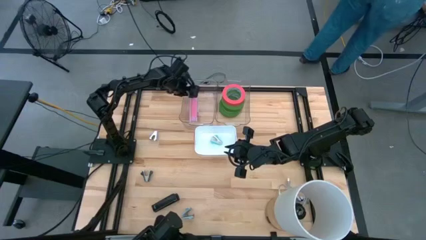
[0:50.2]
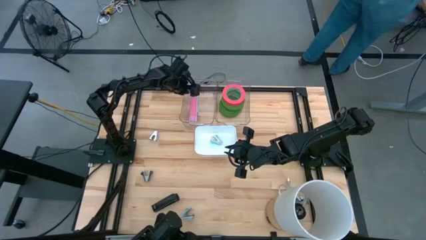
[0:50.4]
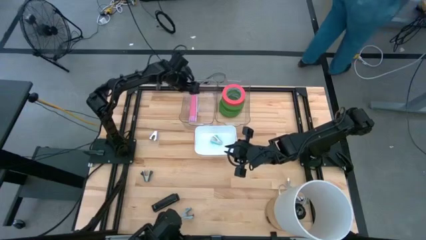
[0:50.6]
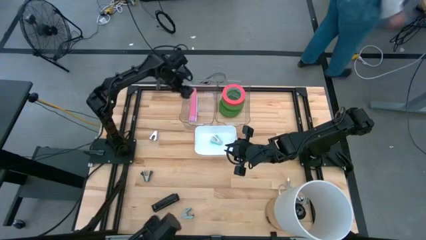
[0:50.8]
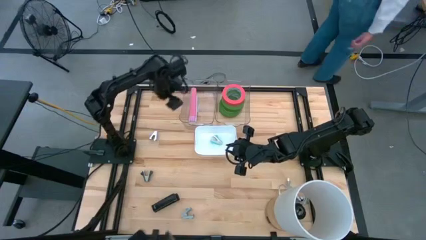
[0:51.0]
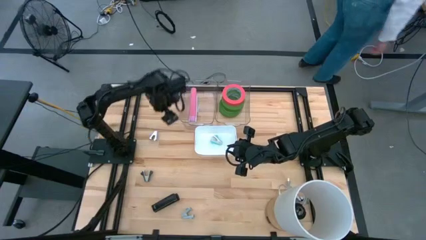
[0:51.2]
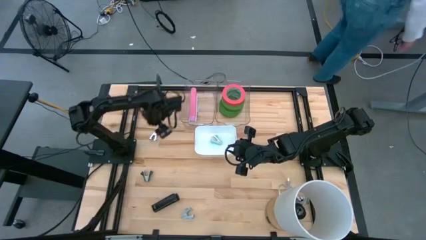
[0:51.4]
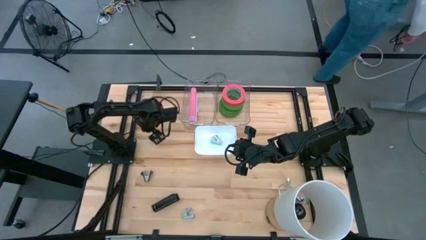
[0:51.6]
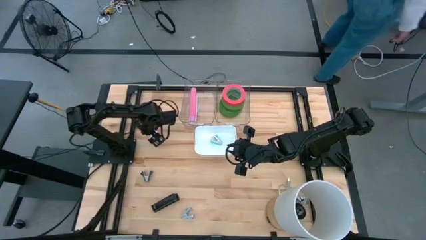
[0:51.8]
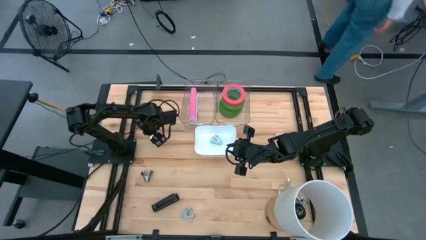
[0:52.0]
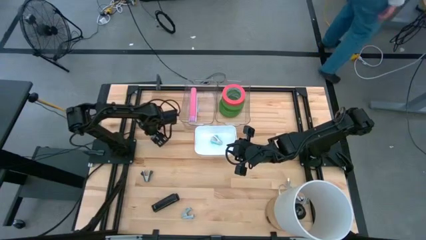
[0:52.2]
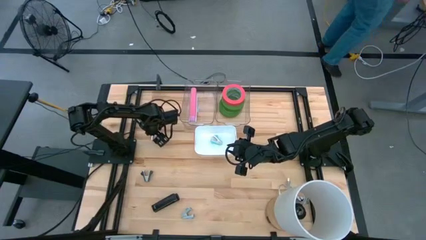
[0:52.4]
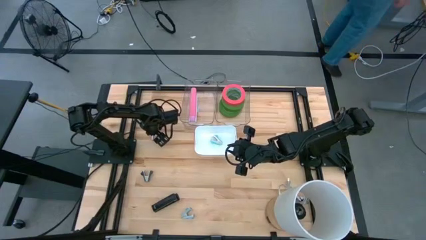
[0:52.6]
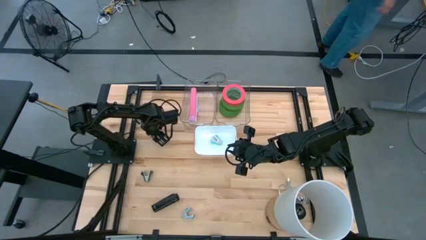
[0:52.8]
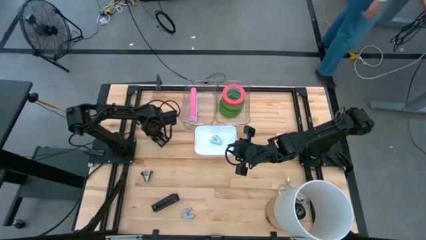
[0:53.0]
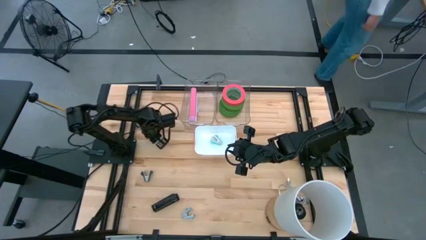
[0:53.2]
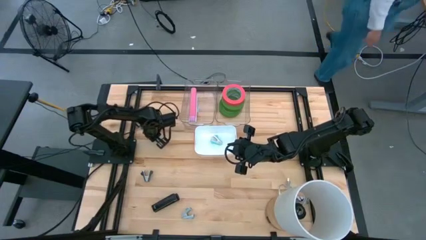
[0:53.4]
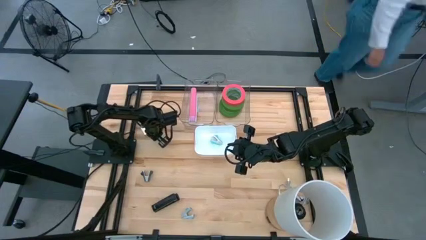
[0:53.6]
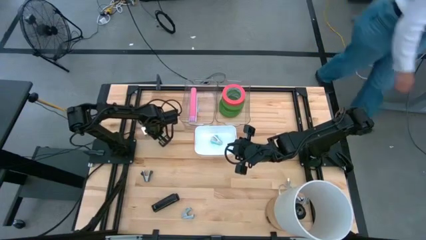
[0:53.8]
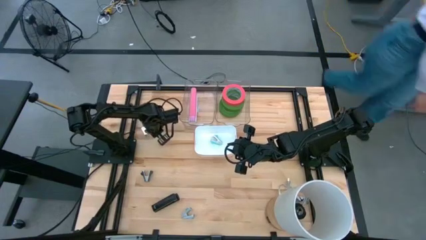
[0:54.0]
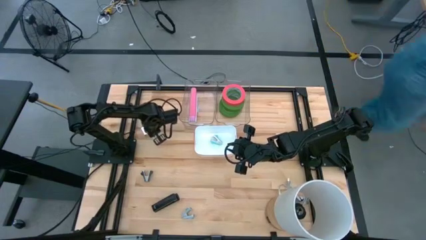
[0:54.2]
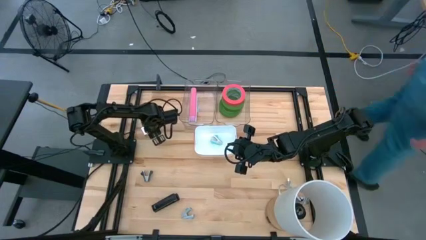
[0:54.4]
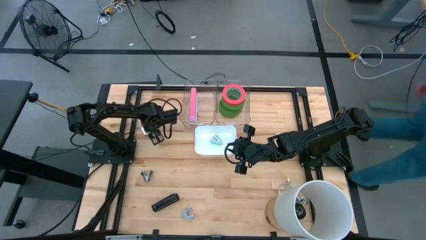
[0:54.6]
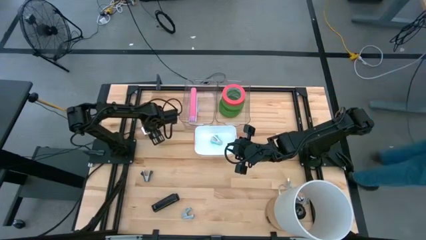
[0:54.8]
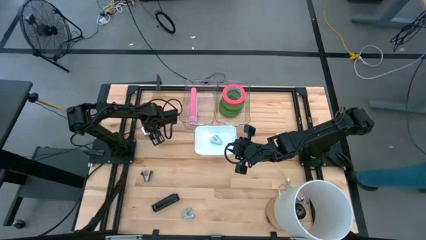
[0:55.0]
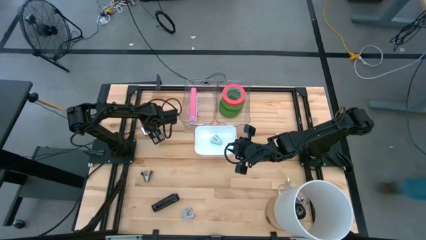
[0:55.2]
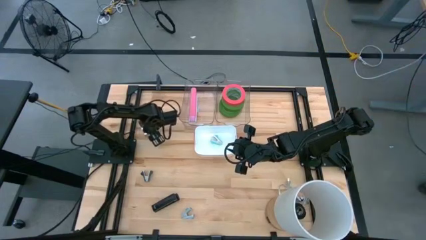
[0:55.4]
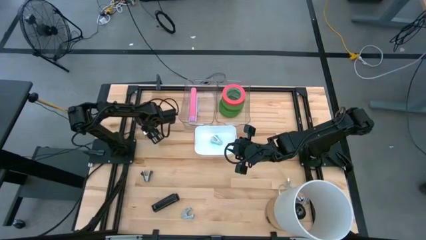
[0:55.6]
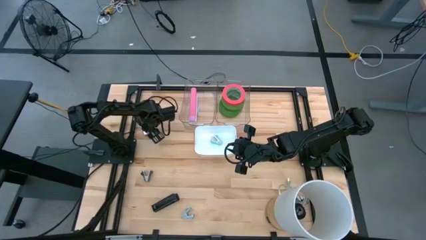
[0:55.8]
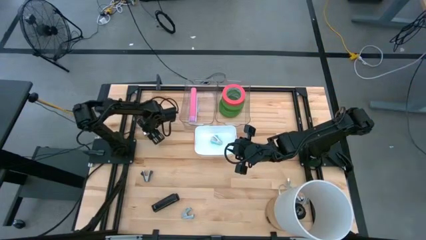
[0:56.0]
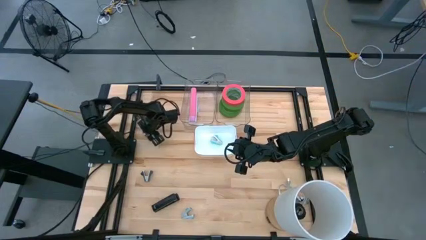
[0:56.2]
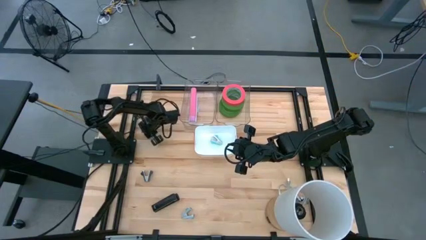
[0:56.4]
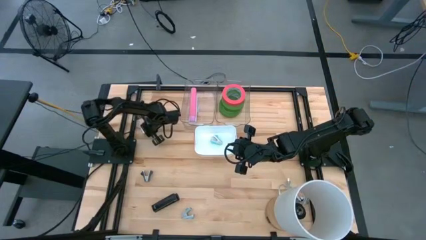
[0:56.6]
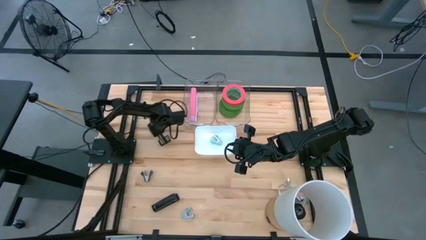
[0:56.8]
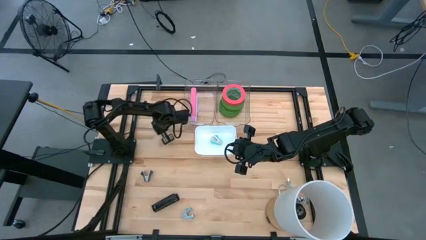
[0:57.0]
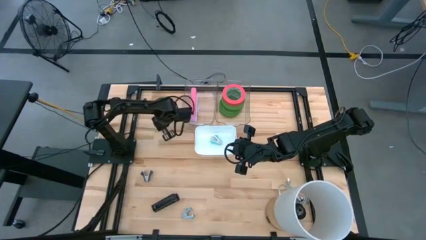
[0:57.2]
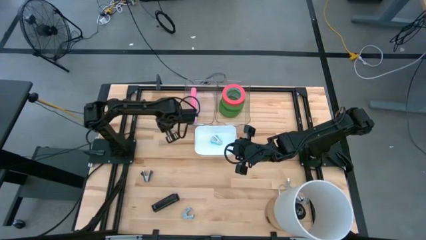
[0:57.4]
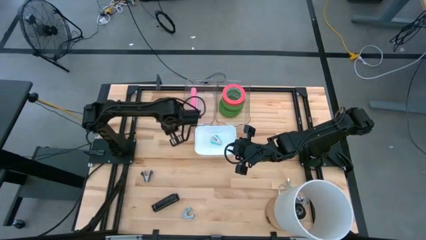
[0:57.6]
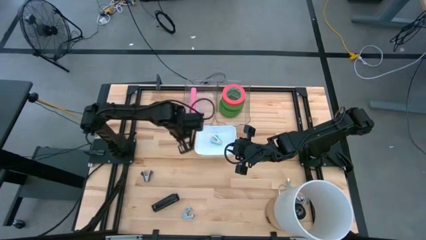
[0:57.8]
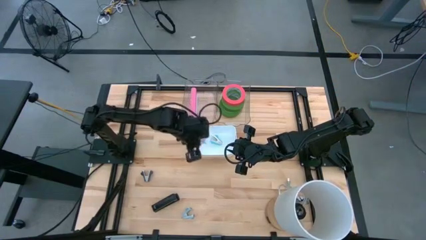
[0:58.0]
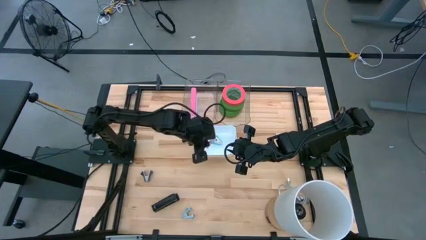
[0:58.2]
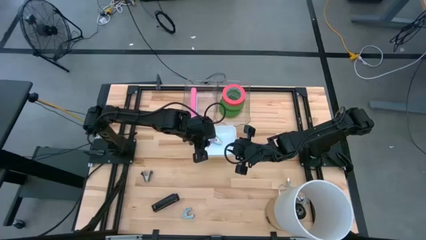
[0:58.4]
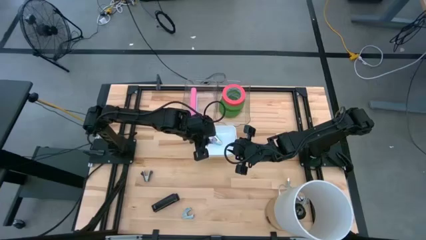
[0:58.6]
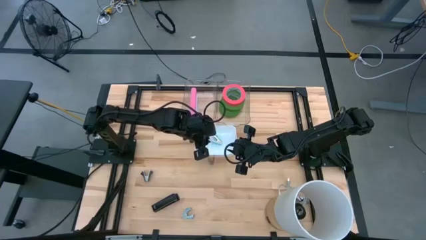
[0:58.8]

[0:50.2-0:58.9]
Task: Pick and place Stapler, Stapler remover, tape
Put the purple staple remover into the white bin

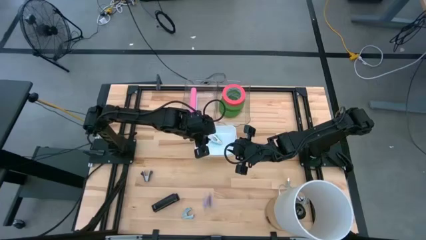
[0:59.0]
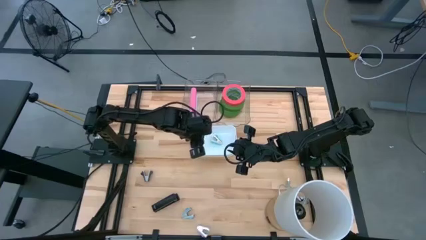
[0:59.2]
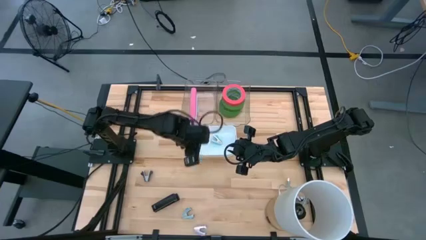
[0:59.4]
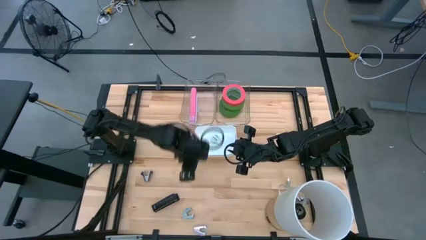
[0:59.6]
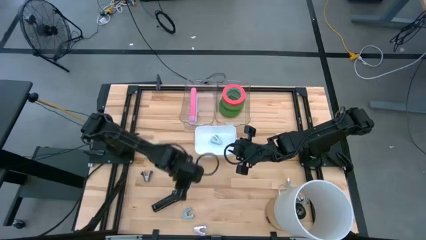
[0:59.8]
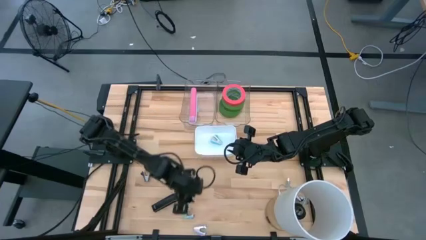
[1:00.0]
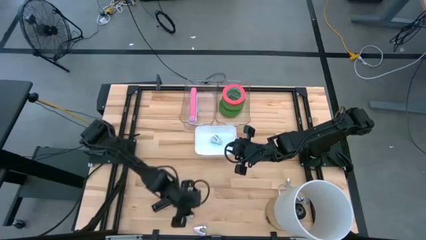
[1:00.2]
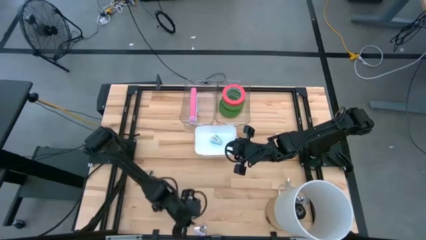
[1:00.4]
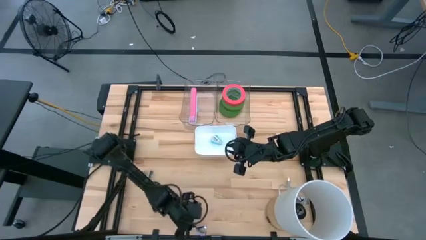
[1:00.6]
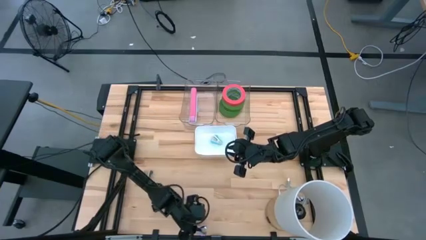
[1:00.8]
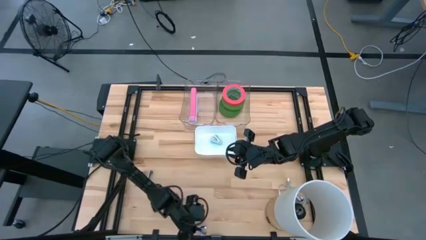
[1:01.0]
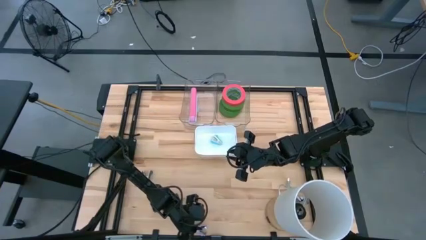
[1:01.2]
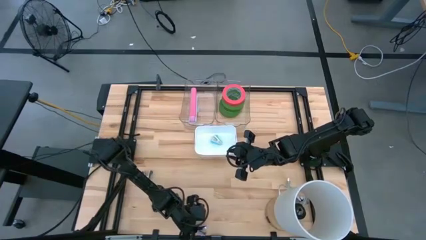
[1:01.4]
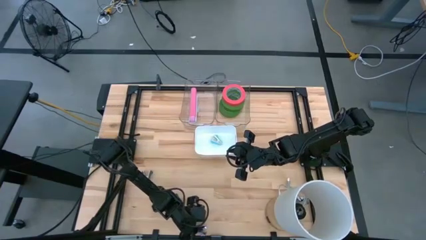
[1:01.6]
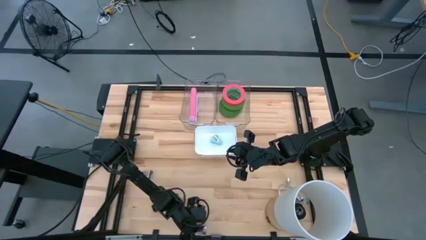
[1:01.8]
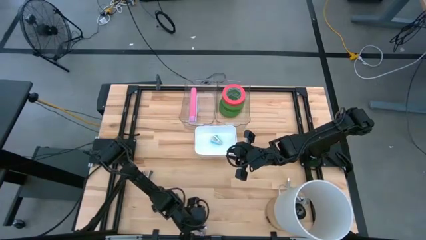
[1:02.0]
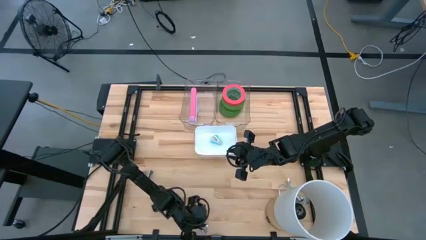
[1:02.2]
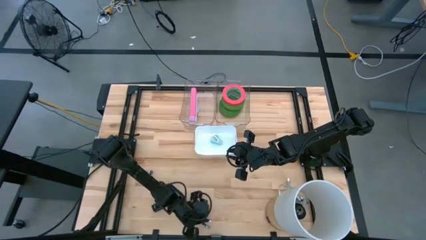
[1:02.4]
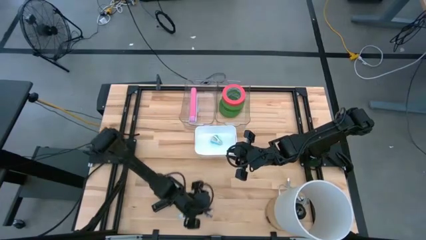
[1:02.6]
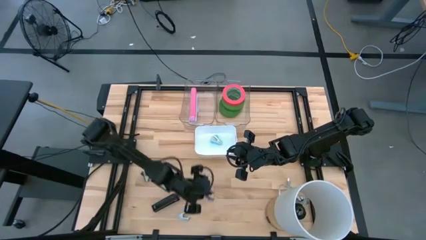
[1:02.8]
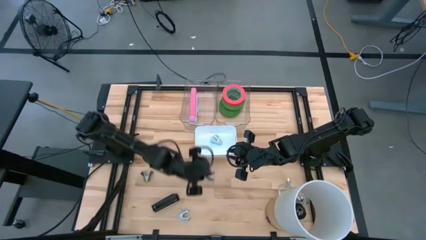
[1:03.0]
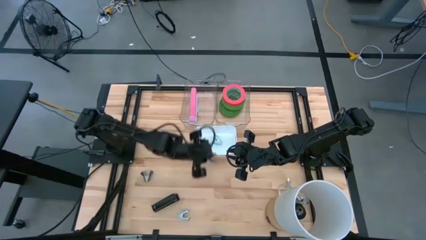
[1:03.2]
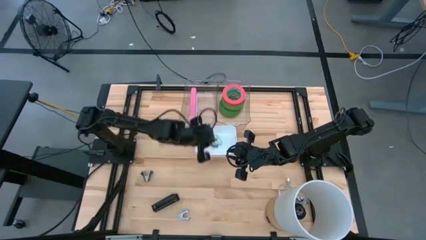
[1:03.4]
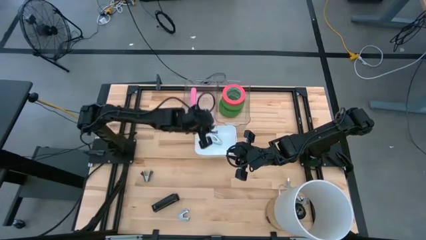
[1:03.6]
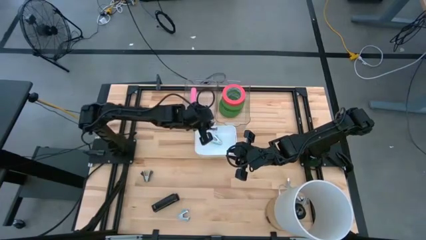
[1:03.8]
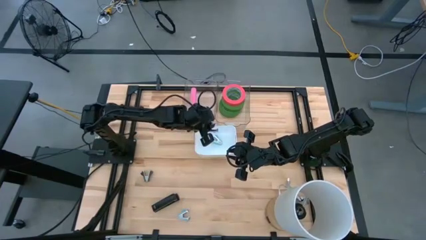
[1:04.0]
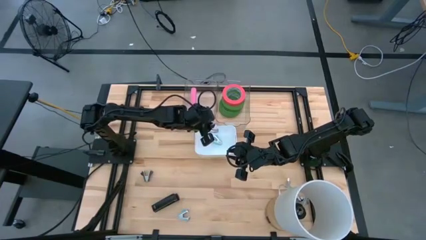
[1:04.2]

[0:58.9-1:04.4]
Put the purple staple remover into the white bin

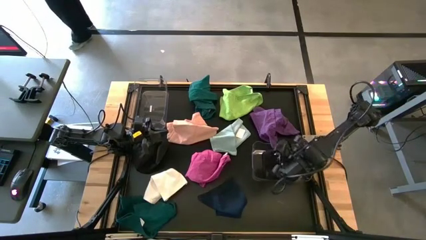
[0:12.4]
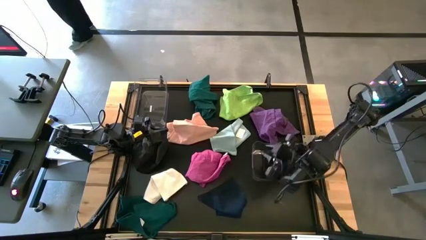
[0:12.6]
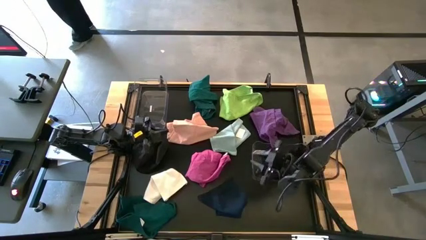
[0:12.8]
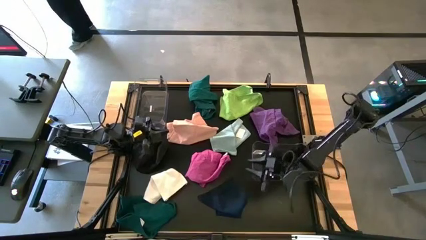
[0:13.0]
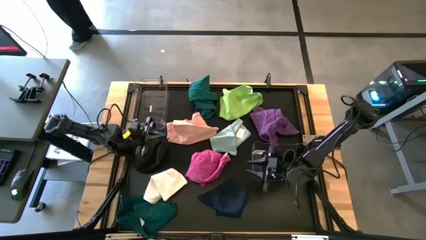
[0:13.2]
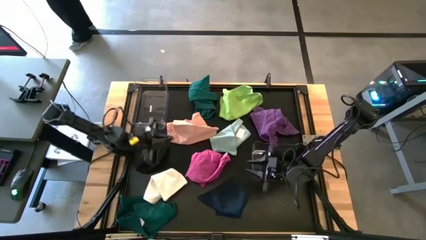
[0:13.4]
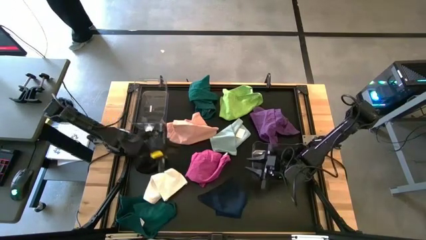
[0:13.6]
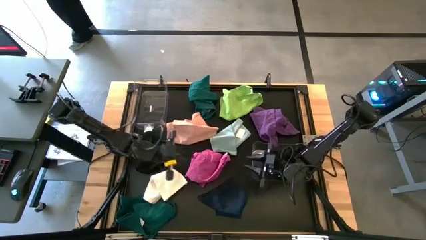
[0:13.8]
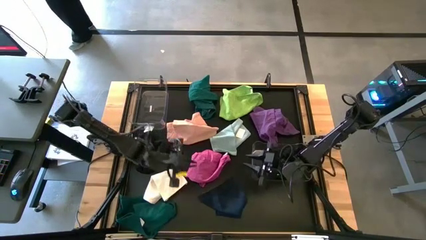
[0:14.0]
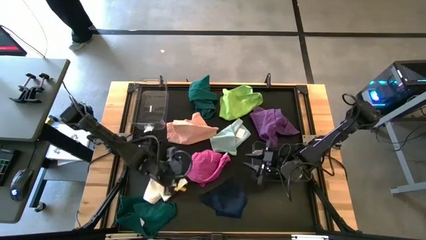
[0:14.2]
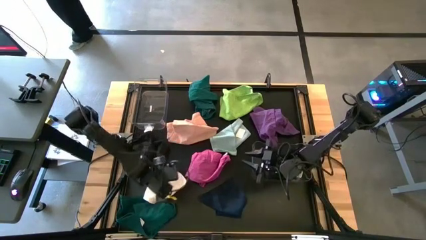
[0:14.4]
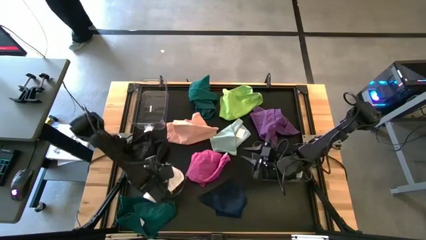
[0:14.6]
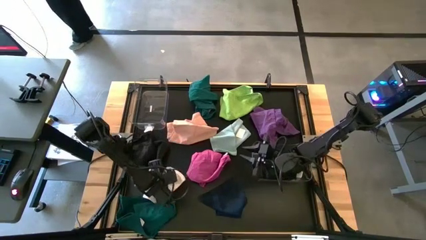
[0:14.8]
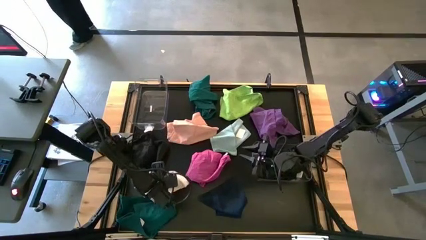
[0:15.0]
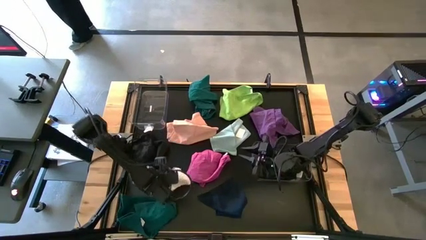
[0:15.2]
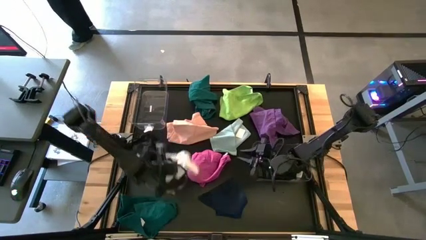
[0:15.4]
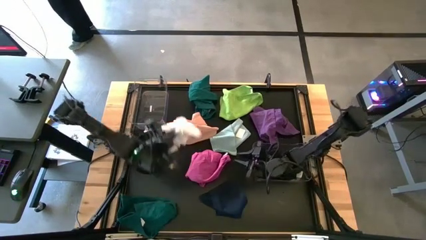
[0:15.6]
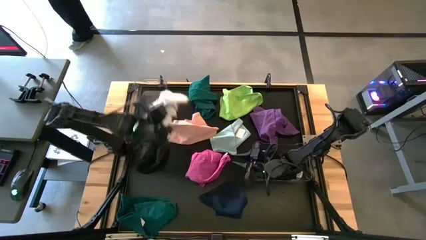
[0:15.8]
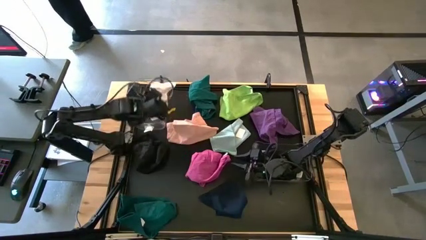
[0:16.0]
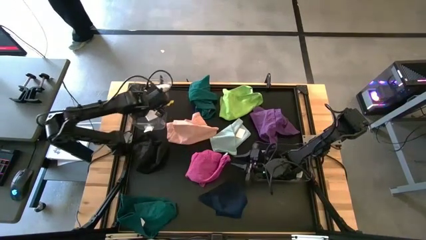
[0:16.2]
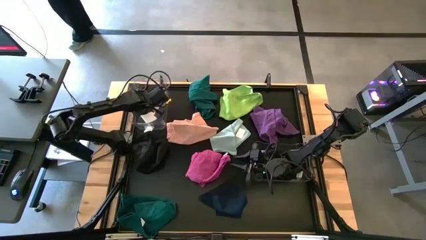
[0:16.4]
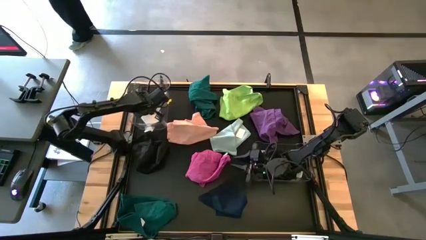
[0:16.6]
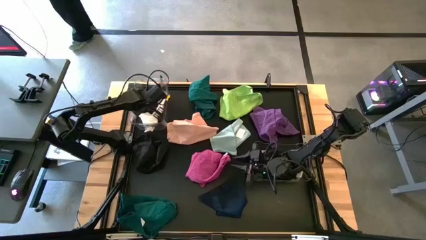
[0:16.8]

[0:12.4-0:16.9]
Task: Sort towels by color in basket
Put the white towel into the left transparent bin
